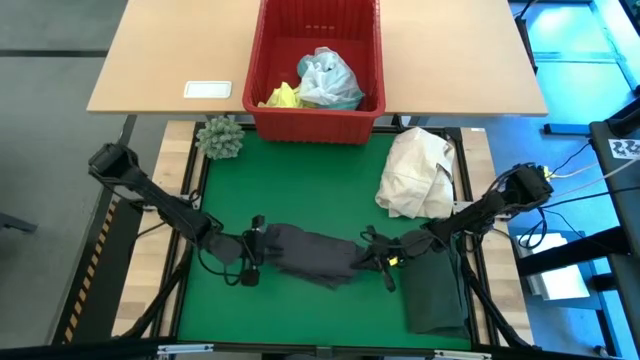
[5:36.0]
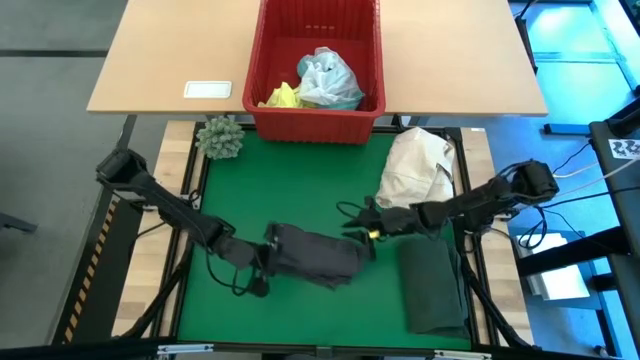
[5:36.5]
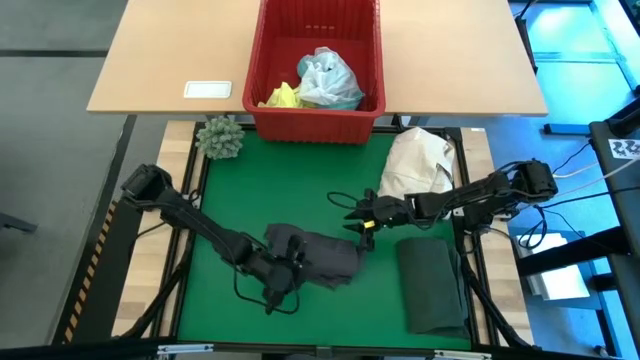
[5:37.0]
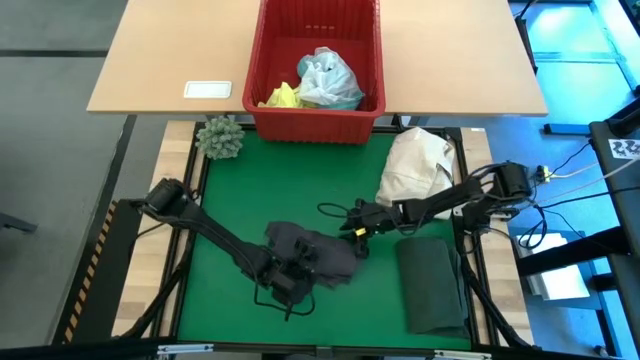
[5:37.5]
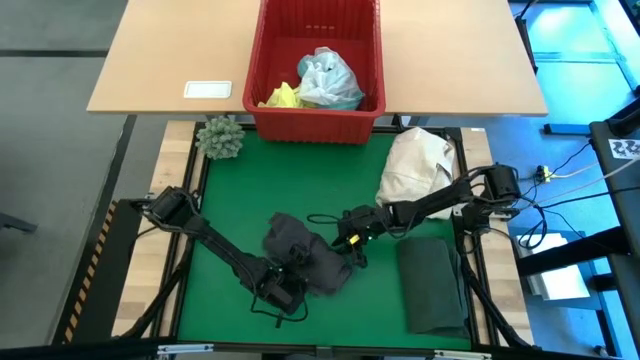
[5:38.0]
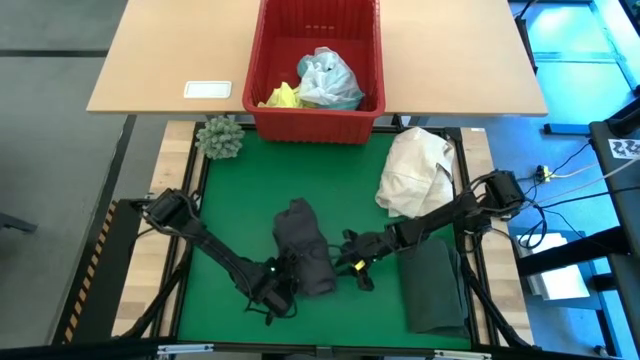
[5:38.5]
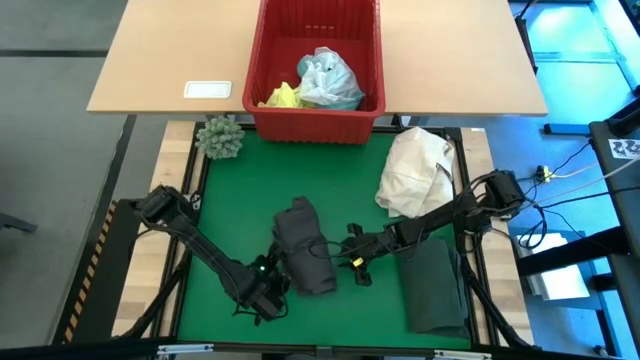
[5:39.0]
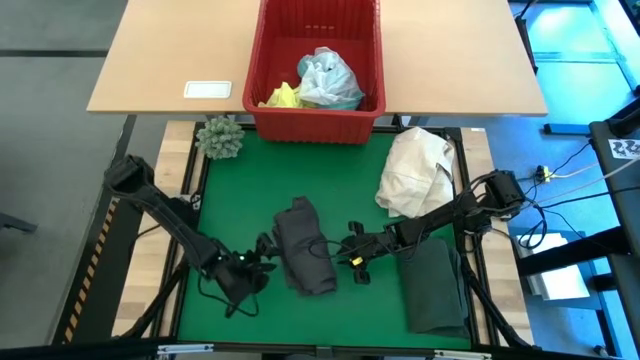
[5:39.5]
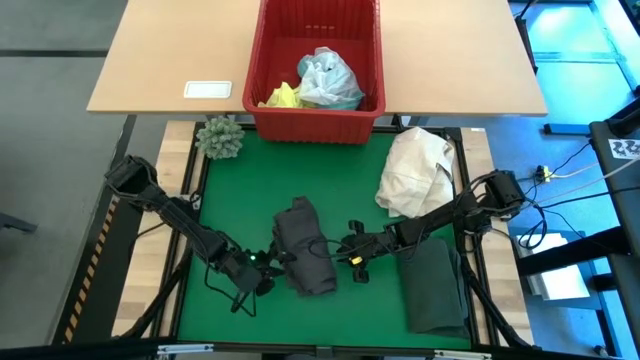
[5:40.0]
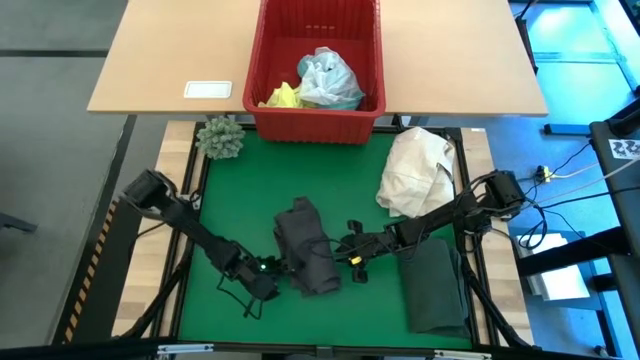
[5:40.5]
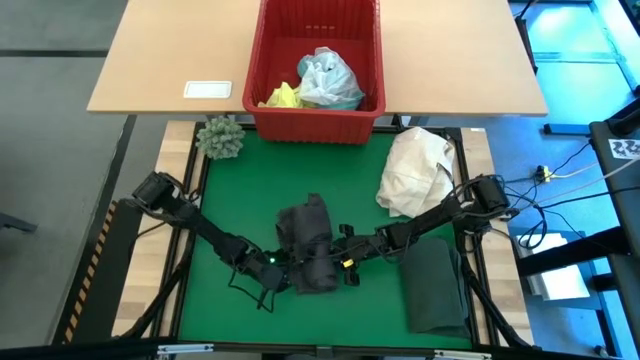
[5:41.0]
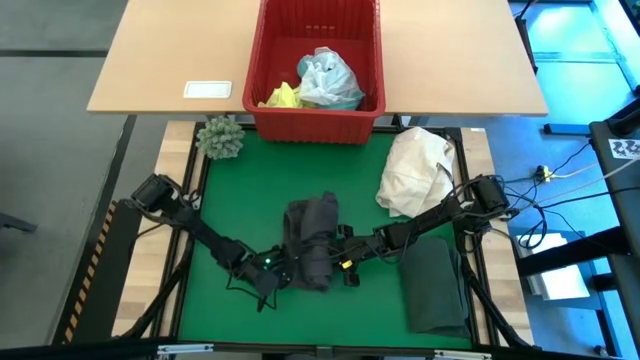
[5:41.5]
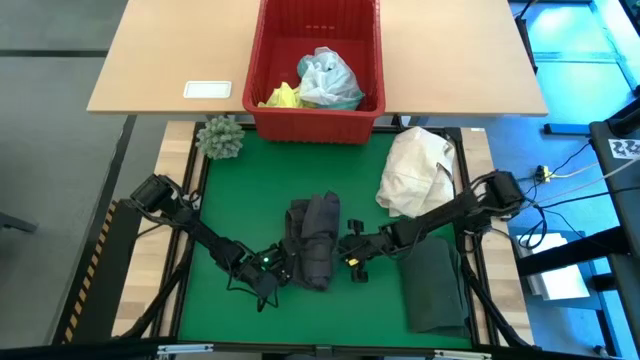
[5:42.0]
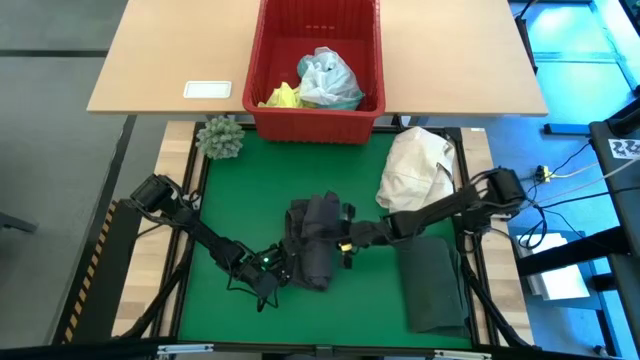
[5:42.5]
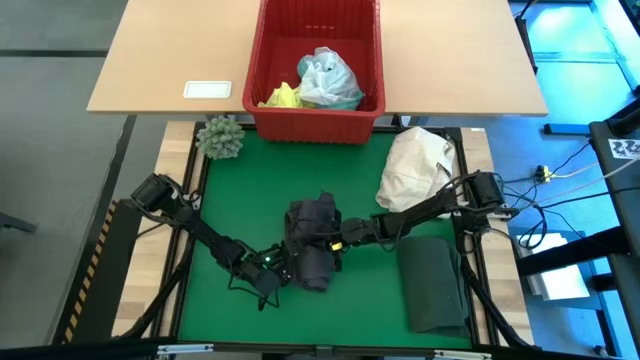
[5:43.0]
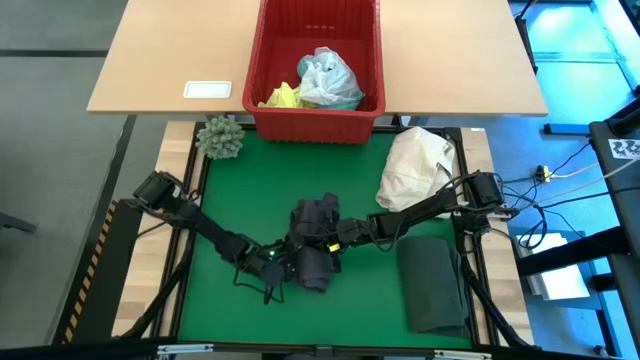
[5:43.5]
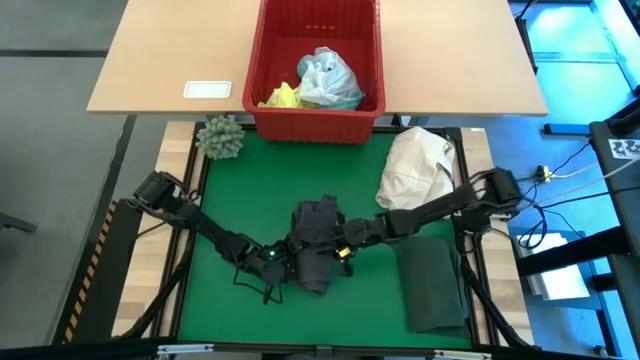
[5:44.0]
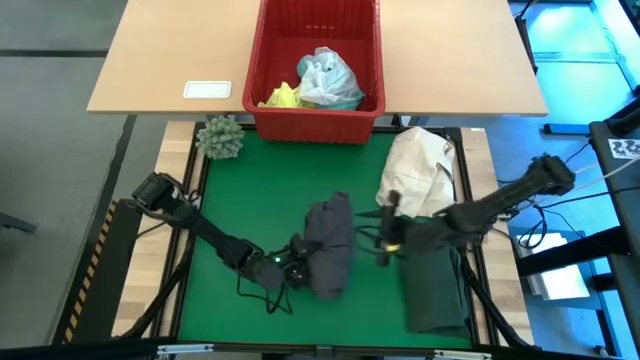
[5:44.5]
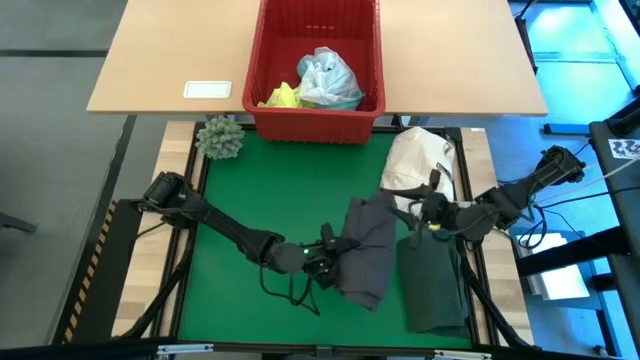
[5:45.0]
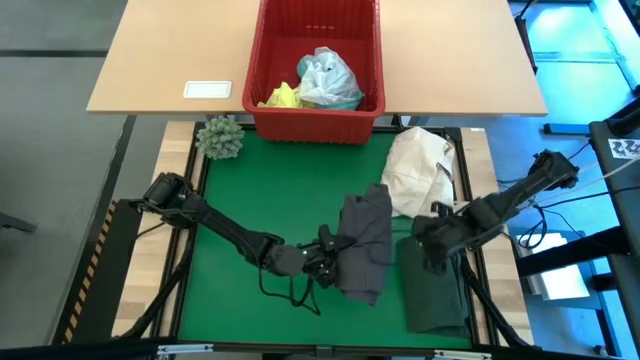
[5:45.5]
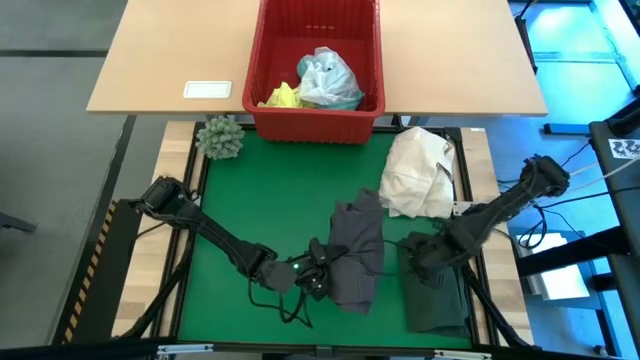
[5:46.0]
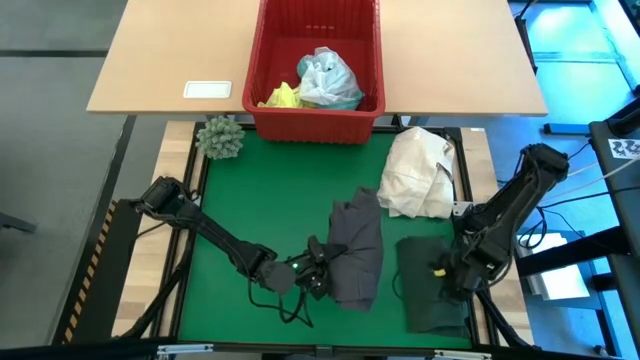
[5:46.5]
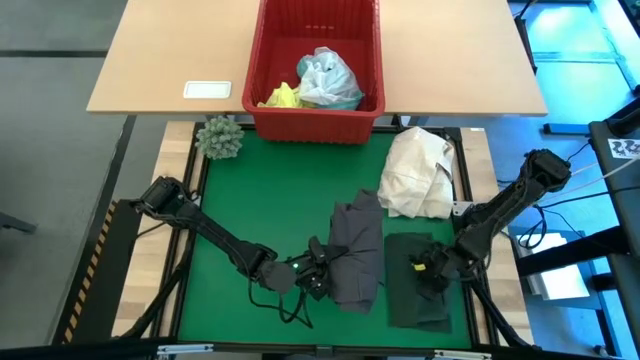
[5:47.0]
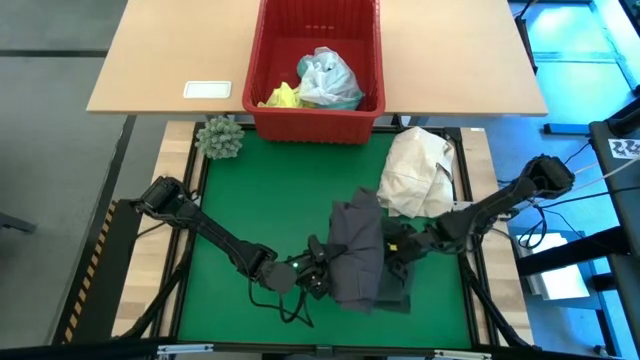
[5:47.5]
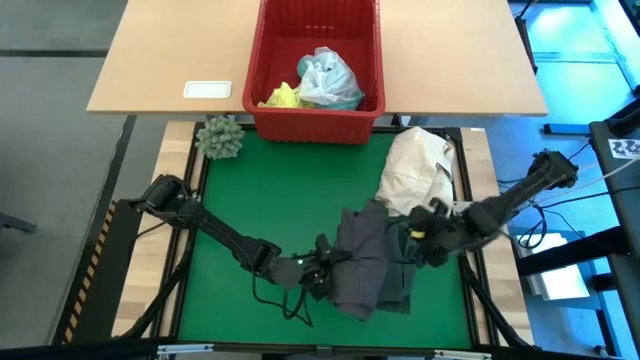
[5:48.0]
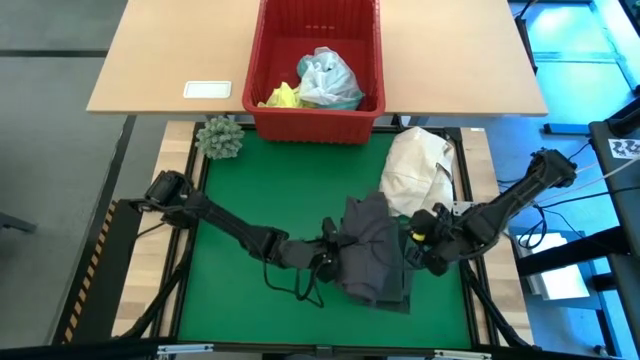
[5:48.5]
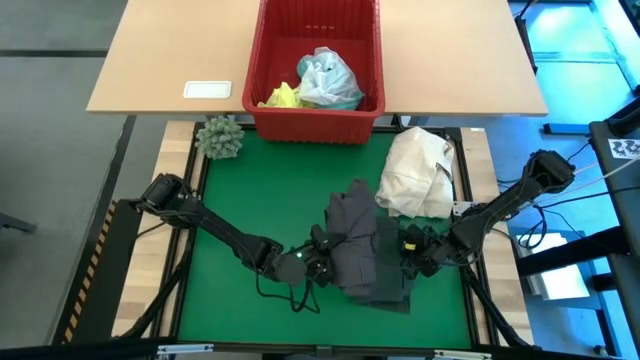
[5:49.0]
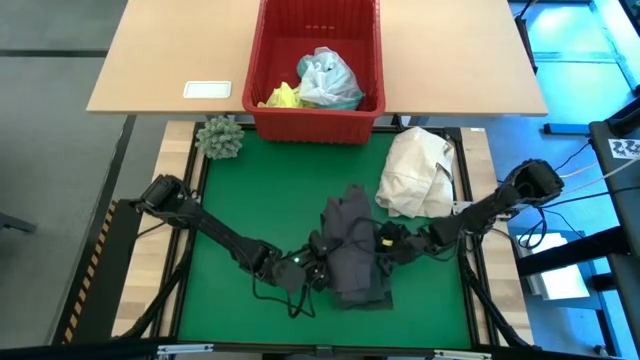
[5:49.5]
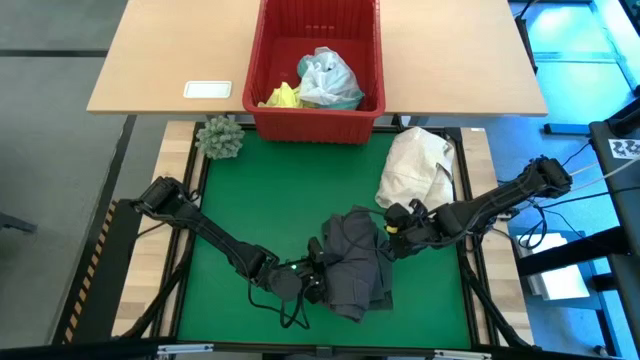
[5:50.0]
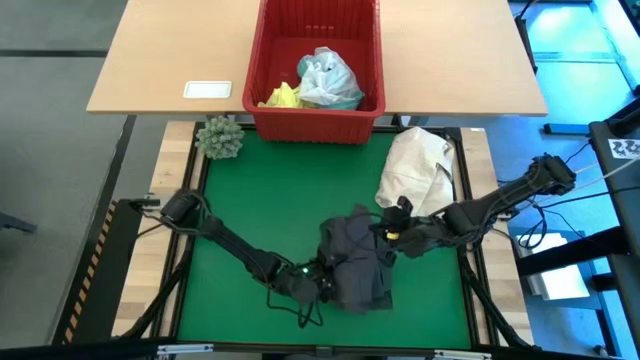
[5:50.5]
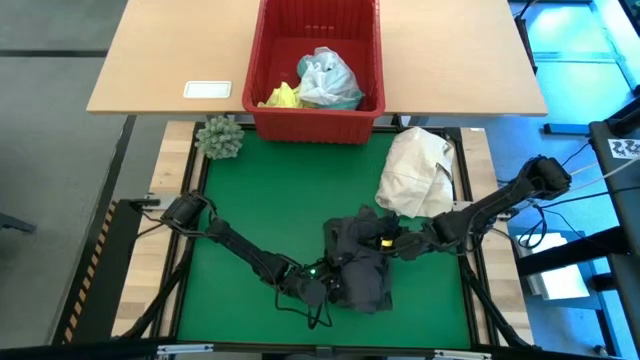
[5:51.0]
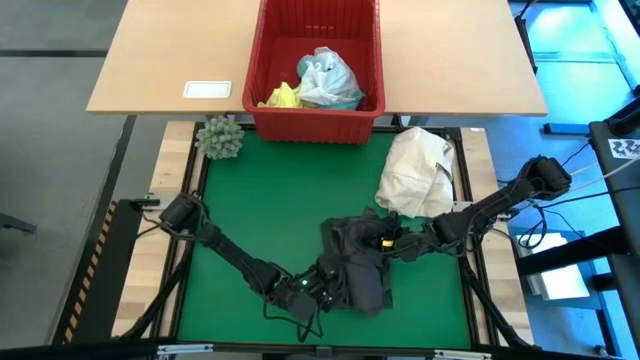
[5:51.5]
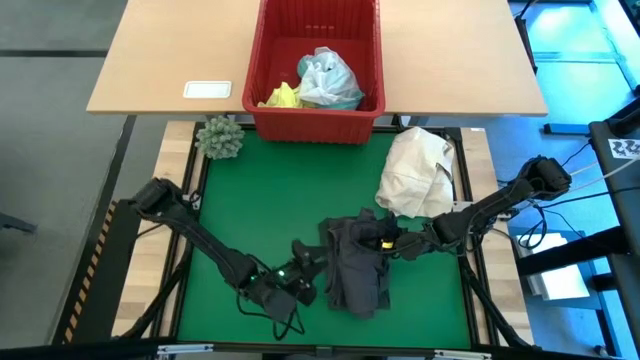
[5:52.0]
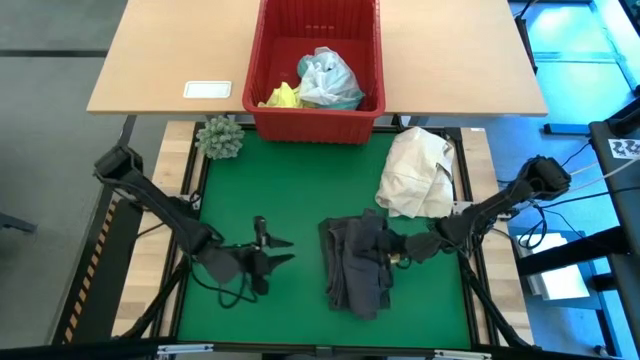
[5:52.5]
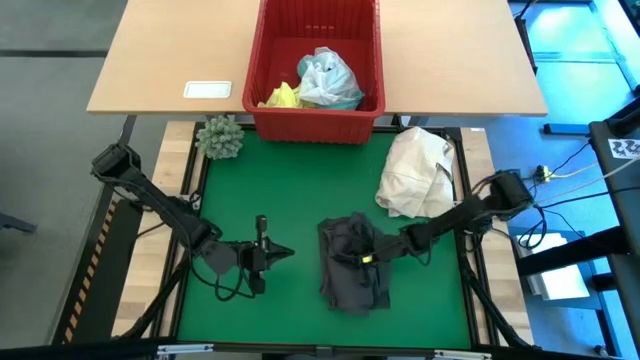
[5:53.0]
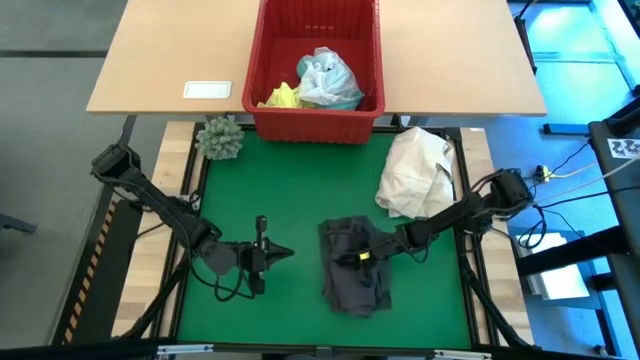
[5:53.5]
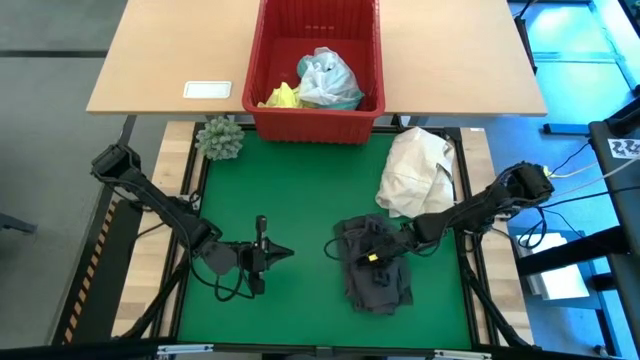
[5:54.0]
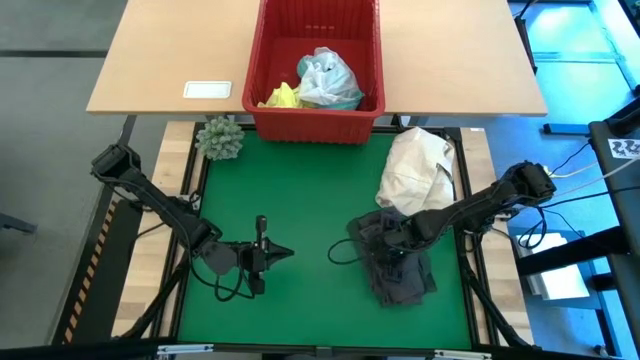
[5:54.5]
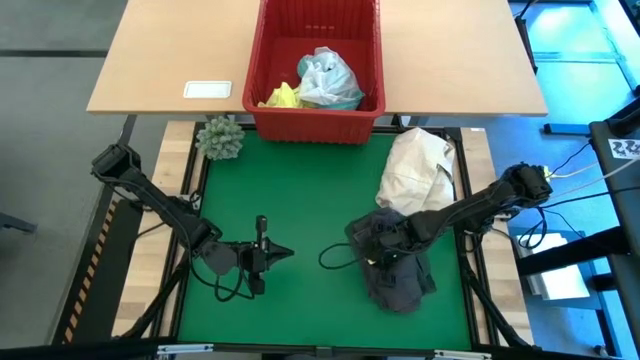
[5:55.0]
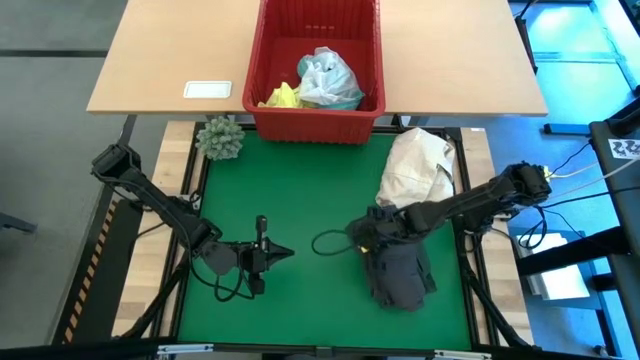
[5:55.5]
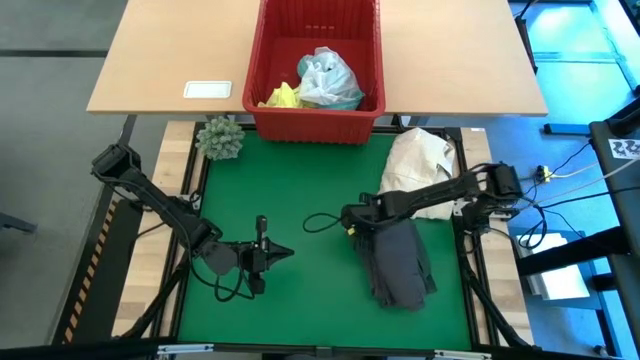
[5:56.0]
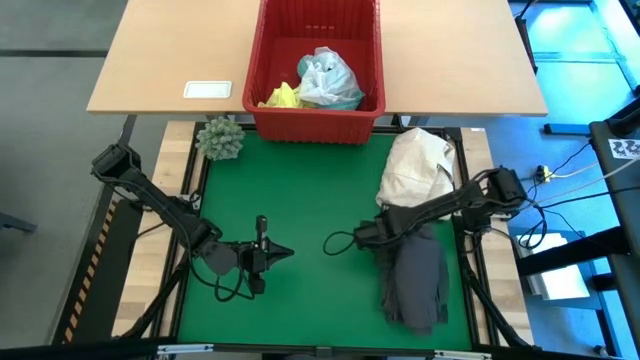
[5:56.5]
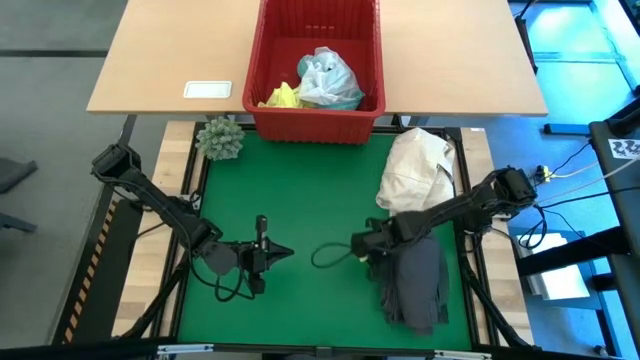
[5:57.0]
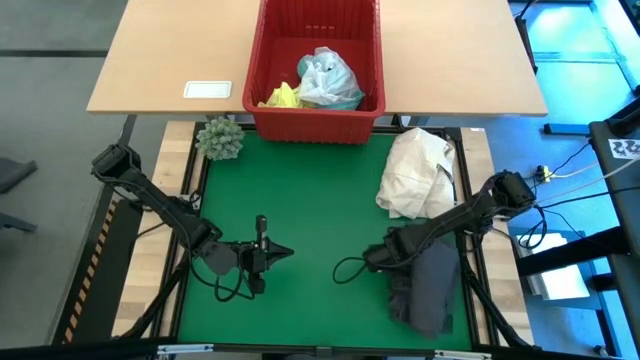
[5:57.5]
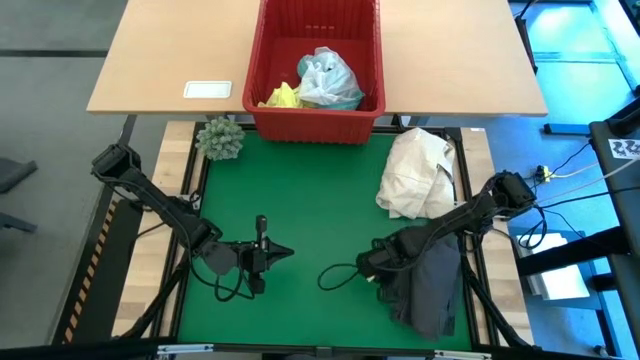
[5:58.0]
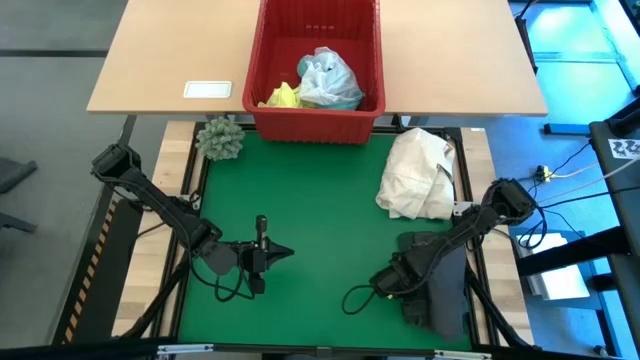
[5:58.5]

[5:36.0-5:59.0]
Task: Fold Laundry from Bin
Stack the gray short on the dark green polo
